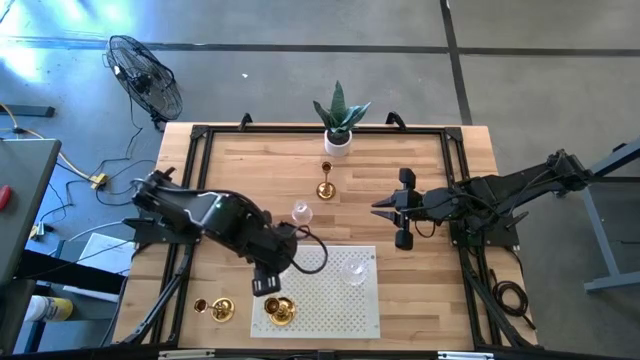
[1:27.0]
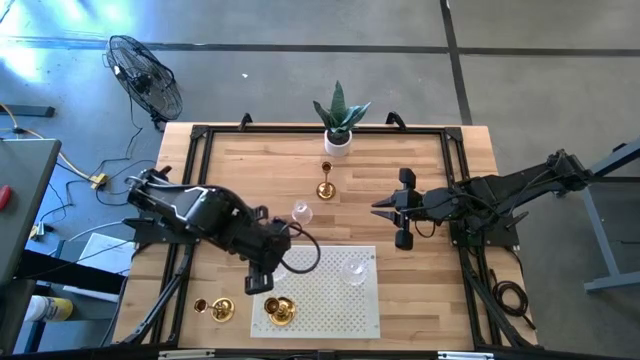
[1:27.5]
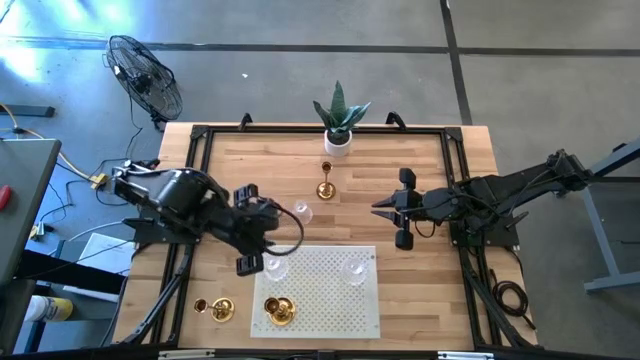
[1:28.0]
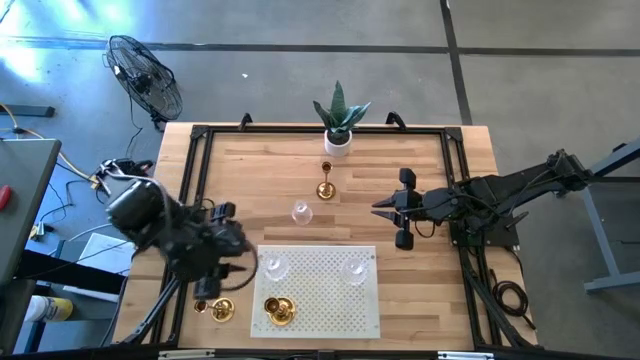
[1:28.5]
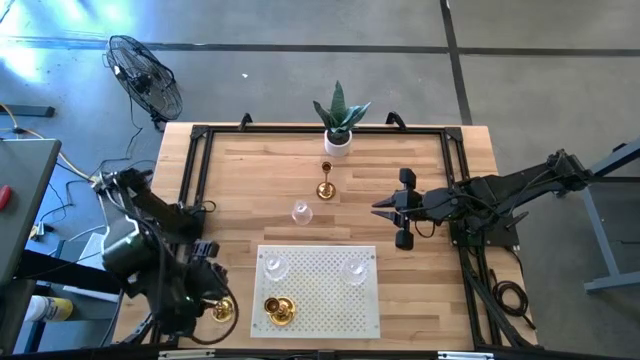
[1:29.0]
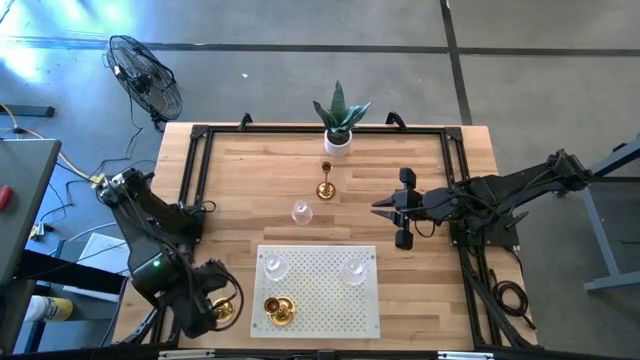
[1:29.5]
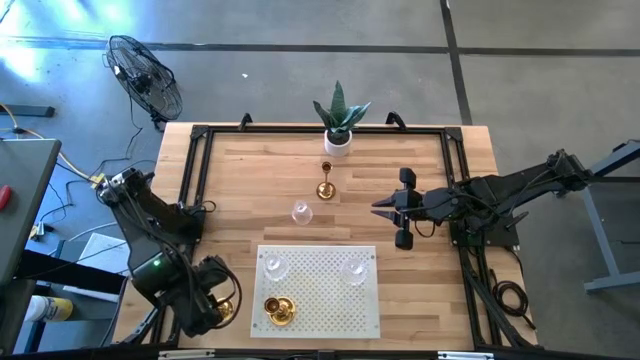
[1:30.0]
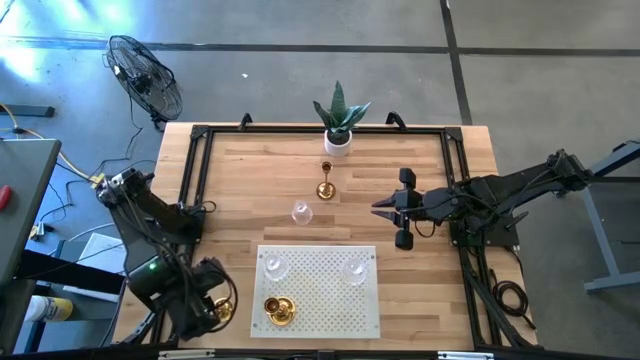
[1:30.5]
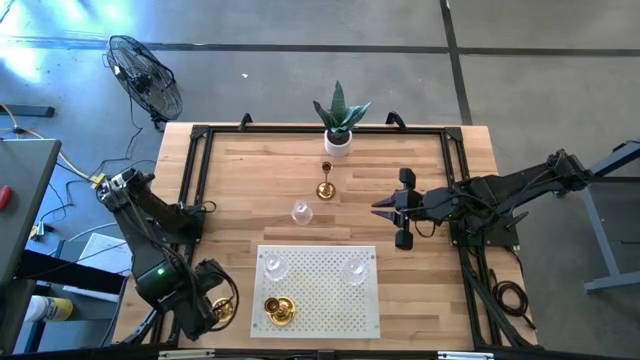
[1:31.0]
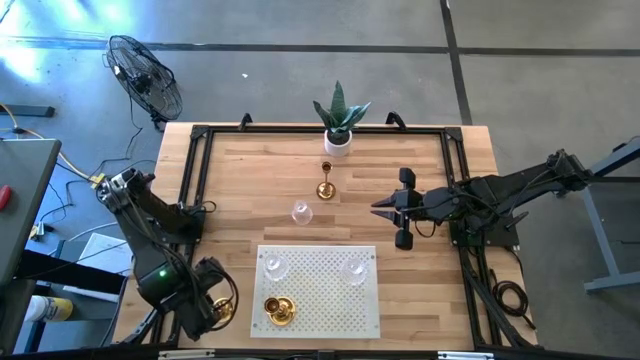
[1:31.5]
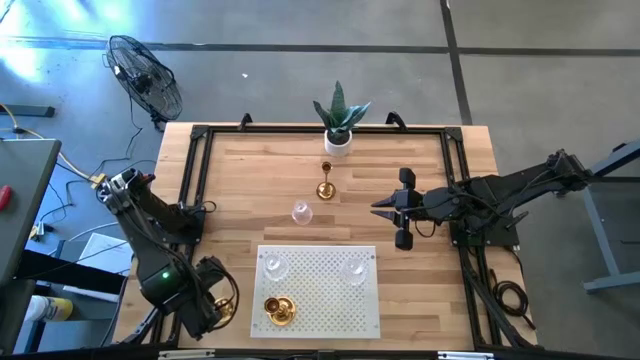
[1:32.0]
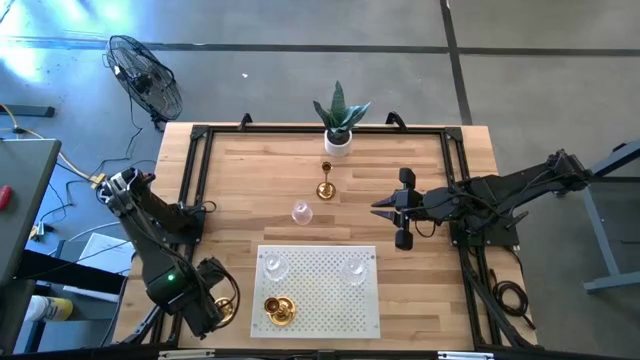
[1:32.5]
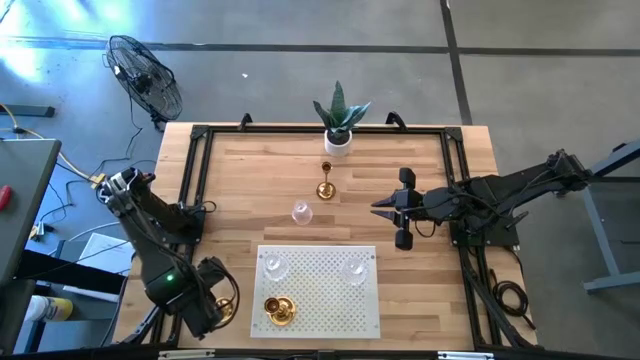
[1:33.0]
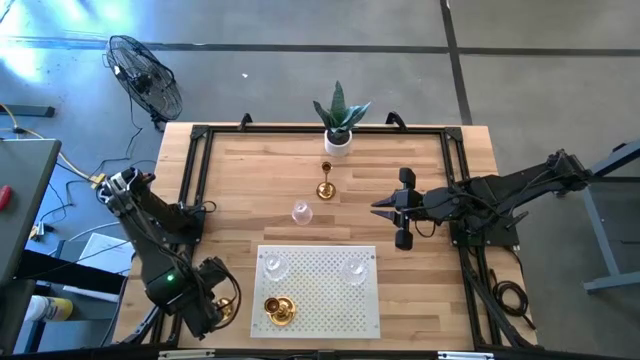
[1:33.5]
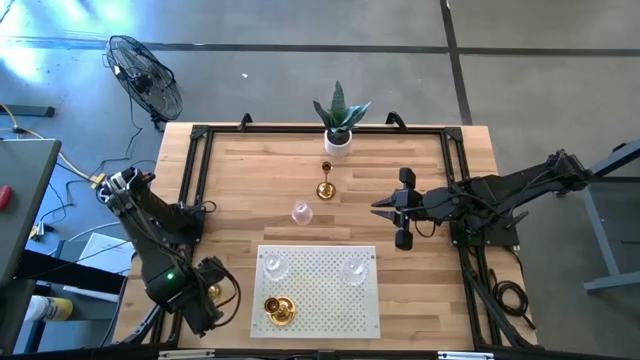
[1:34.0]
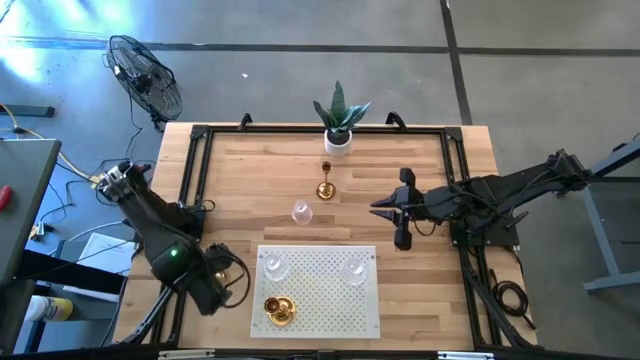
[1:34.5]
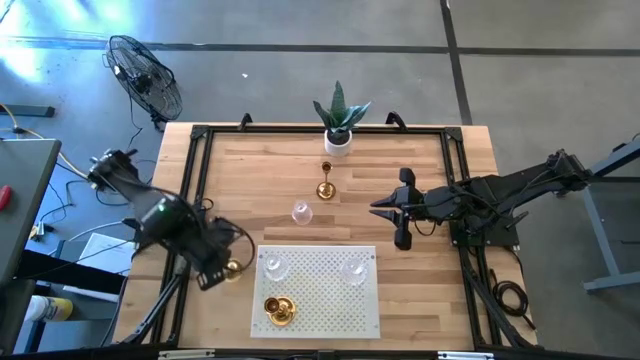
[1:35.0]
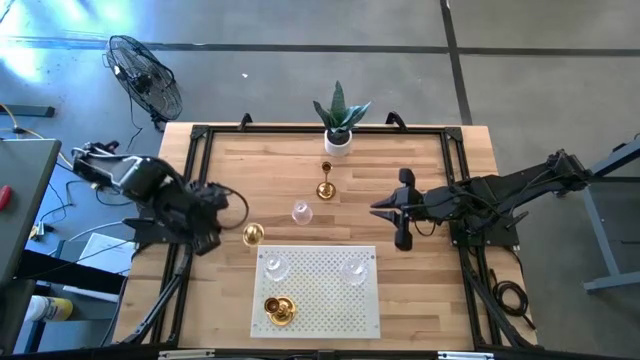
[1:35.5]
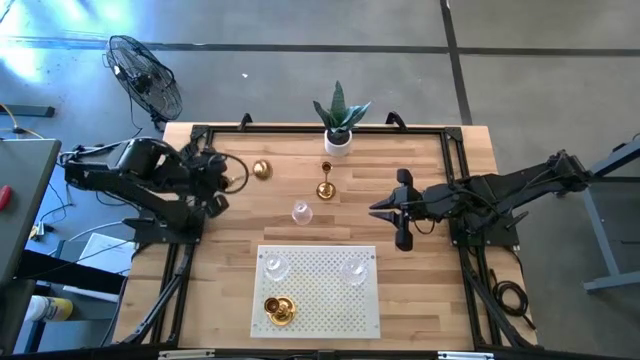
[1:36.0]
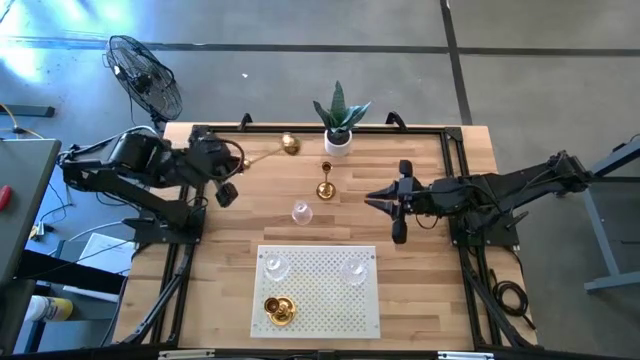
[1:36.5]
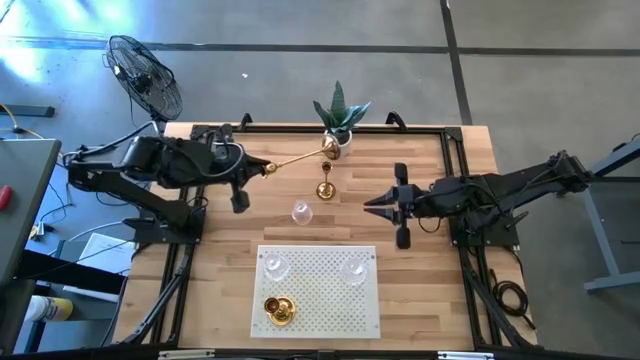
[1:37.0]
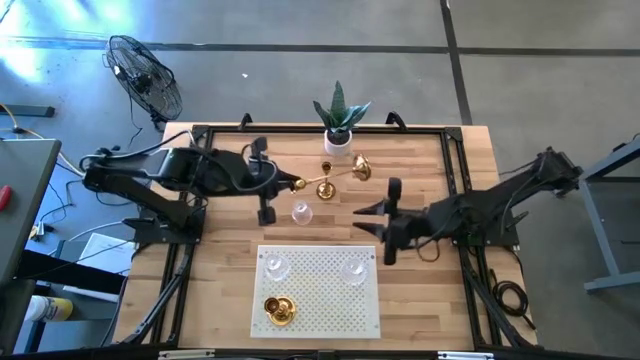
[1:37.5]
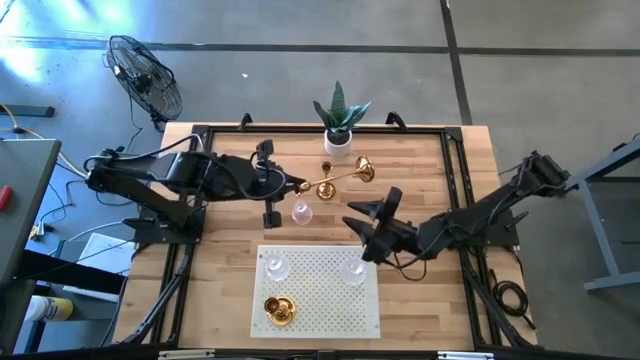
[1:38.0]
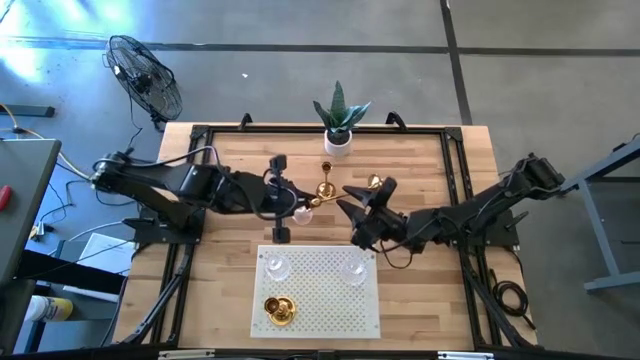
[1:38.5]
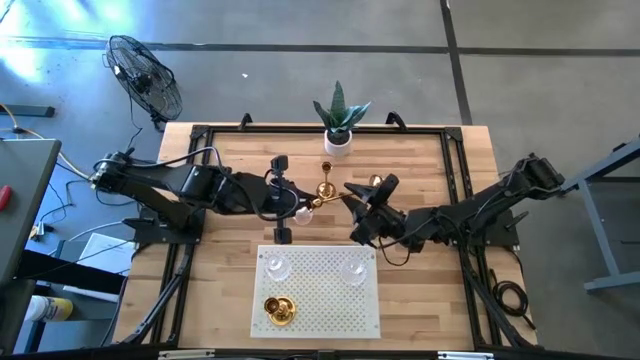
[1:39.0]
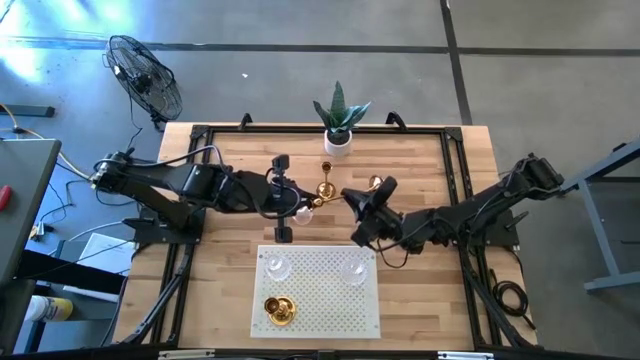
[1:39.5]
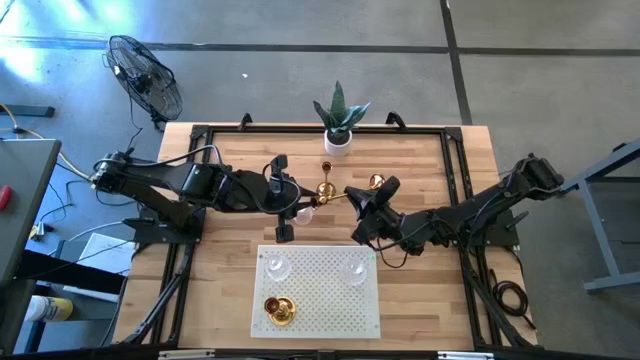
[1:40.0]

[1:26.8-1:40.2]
Task: Pick & Place candle stick holders
Put the bottom gold candle holder on the shelf

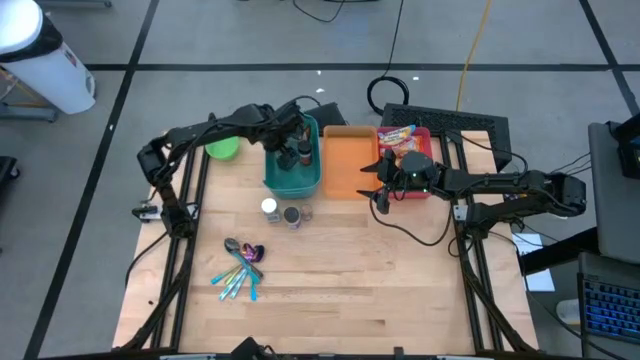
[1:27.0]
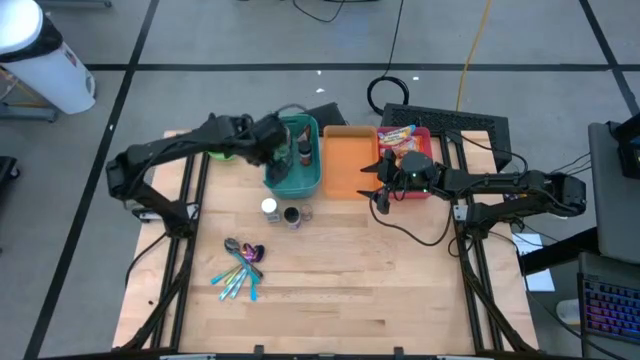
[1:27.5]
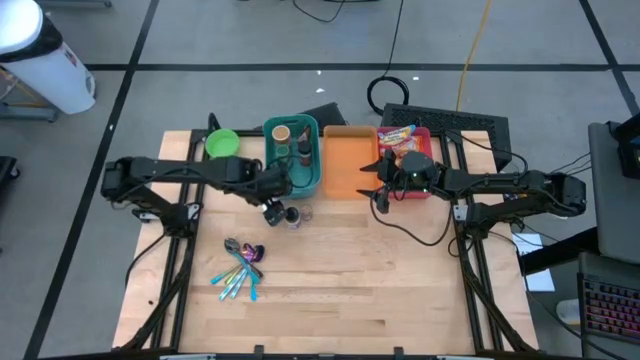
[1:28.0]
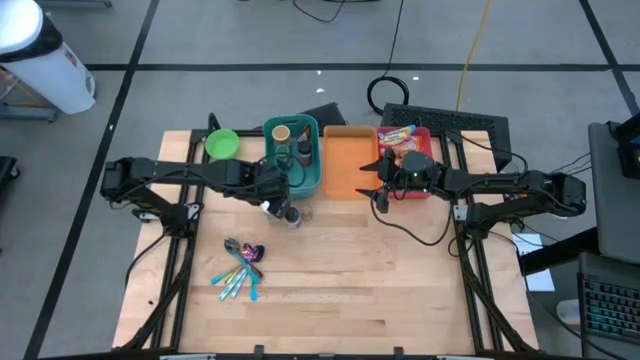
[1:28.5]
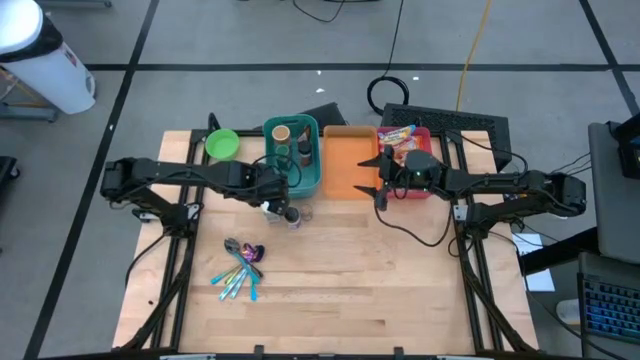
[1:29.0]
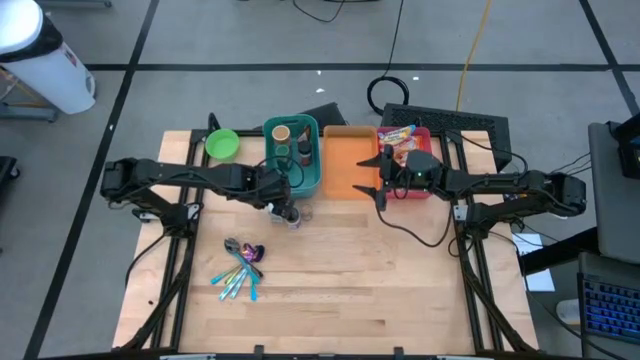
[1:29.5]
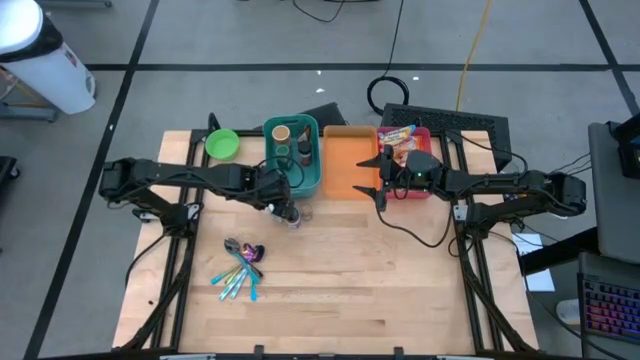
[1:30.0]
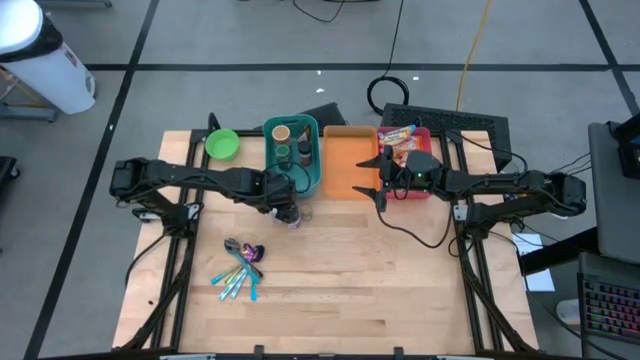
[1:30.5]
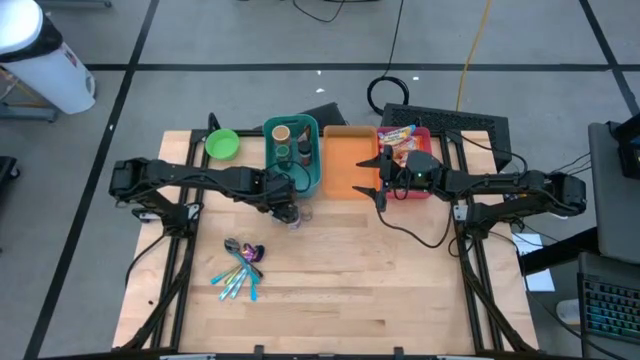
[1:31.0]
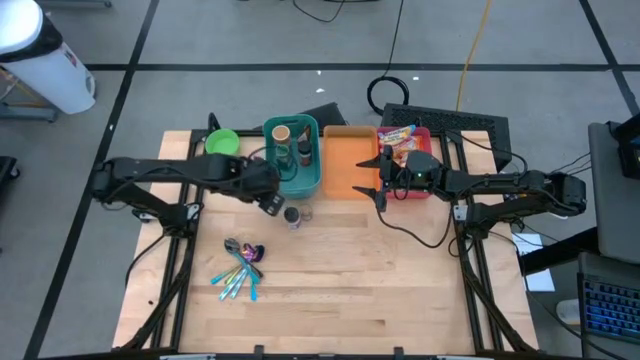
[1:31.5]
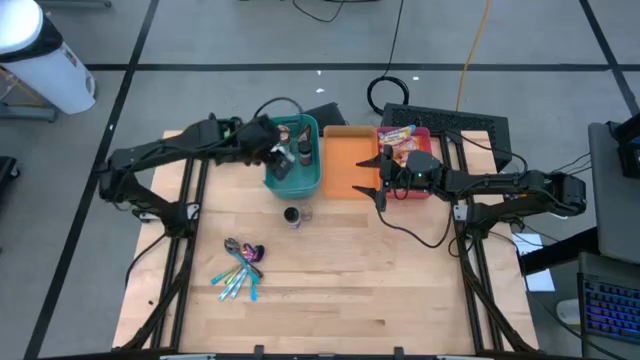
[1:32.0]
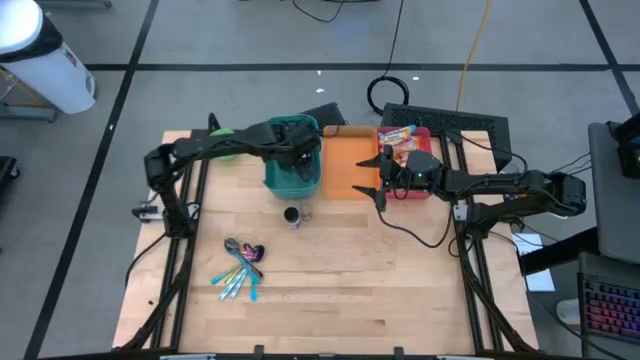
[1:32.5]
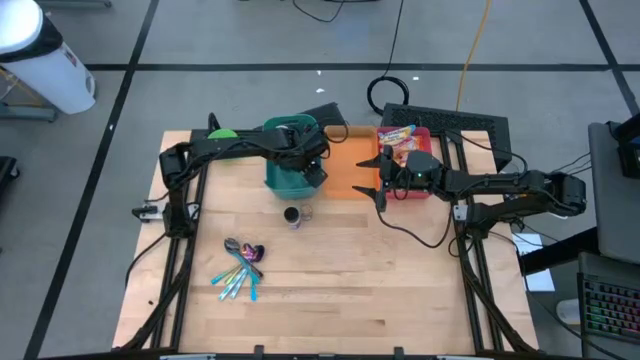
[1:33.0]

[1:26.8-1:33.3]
Task: Pick & Place Food Item
Put the white seasoning bottle into the green bin
